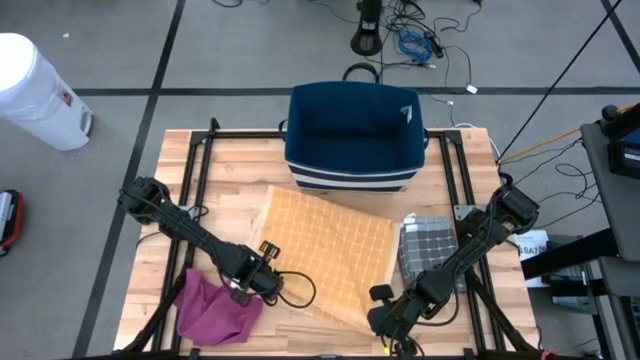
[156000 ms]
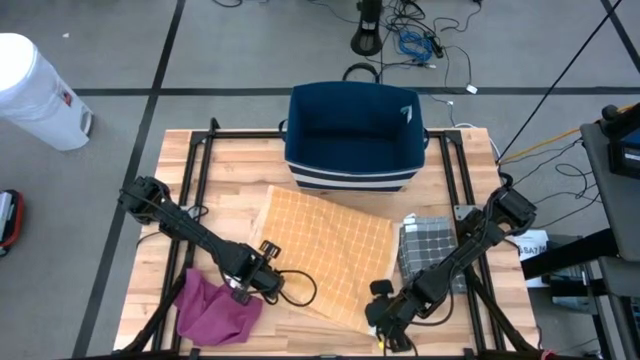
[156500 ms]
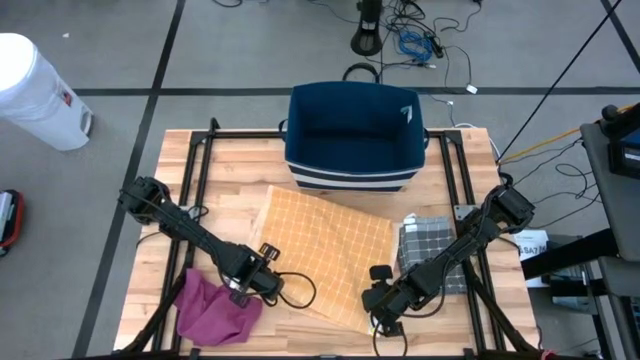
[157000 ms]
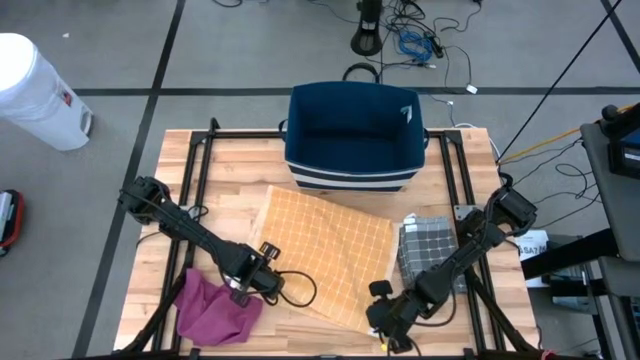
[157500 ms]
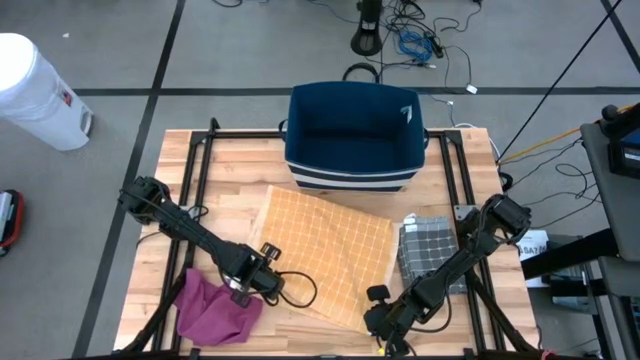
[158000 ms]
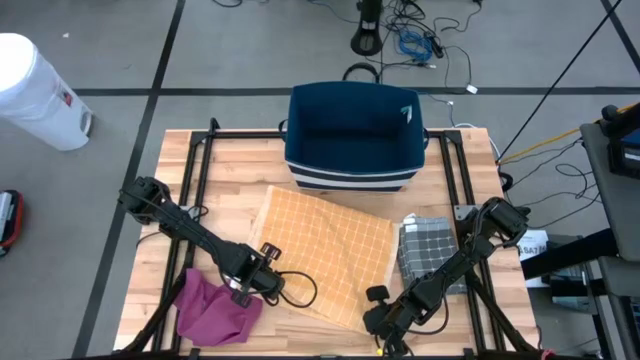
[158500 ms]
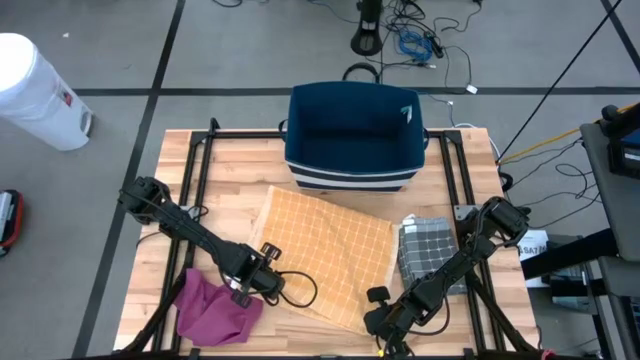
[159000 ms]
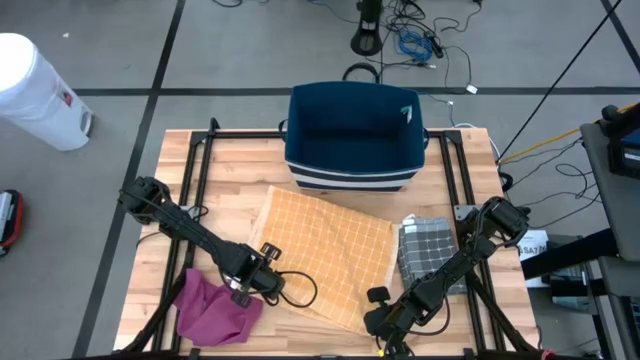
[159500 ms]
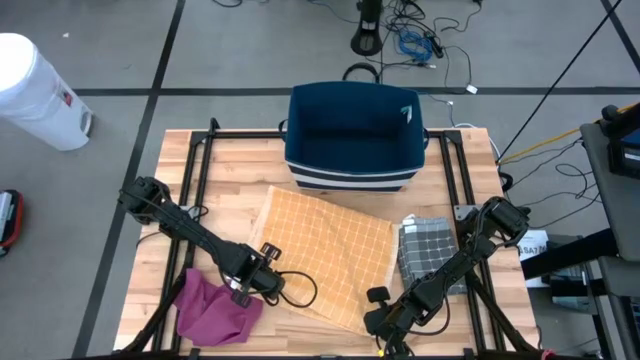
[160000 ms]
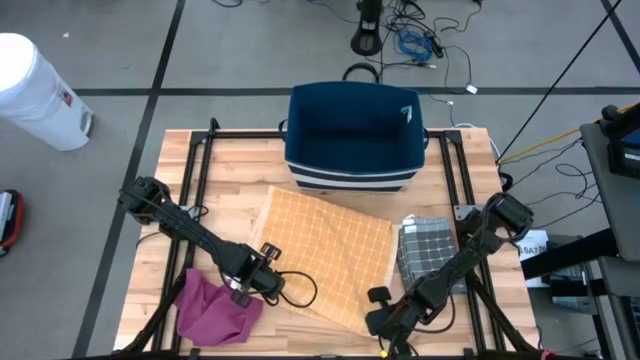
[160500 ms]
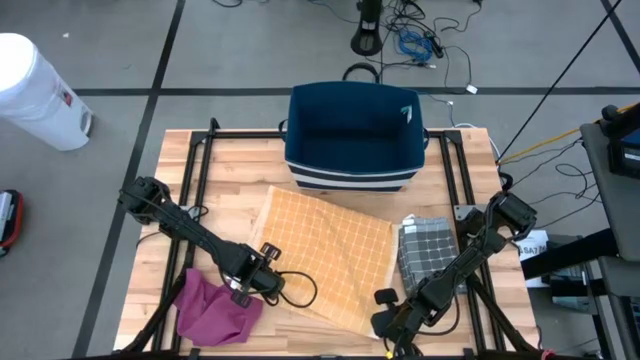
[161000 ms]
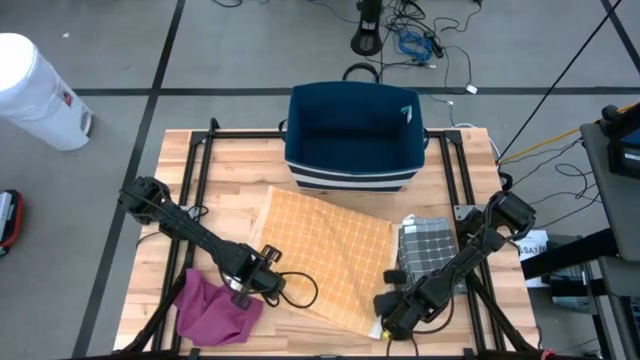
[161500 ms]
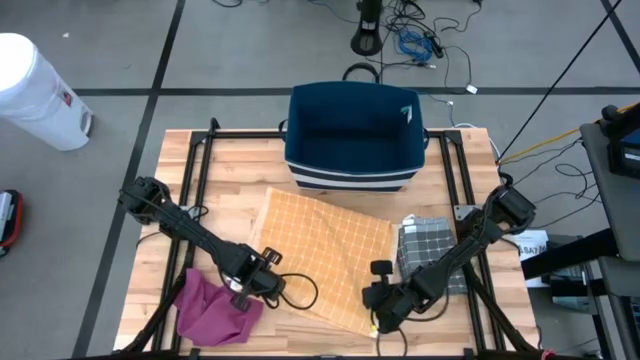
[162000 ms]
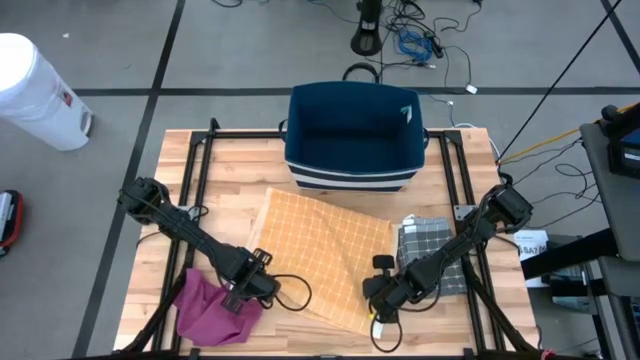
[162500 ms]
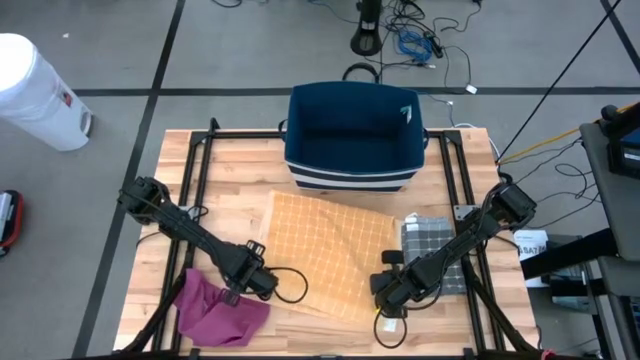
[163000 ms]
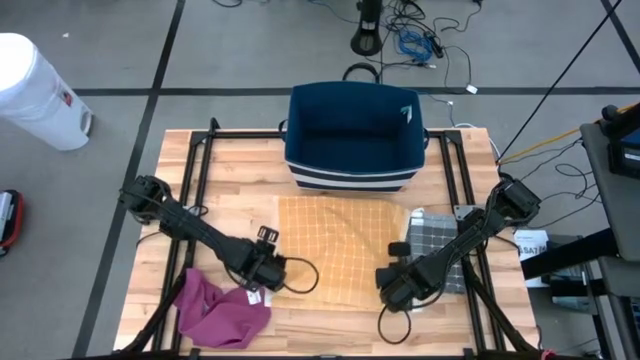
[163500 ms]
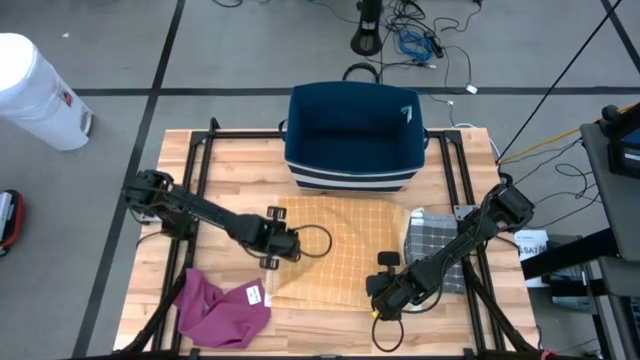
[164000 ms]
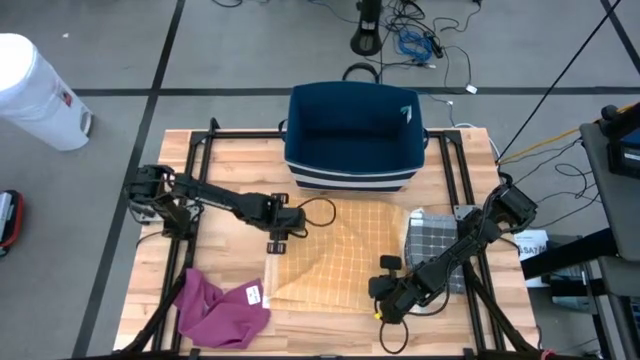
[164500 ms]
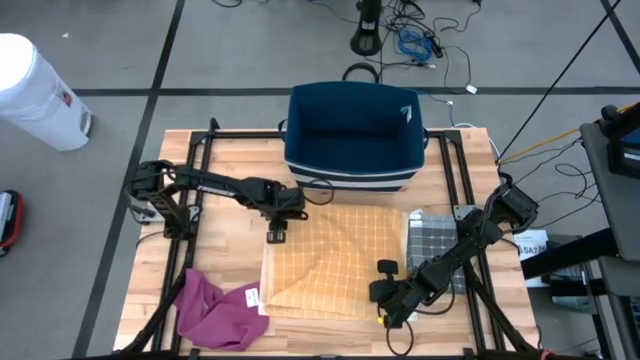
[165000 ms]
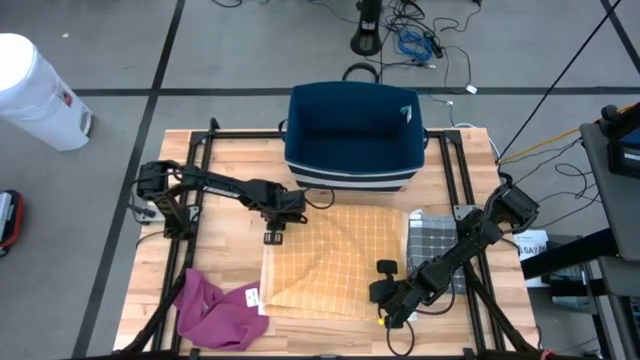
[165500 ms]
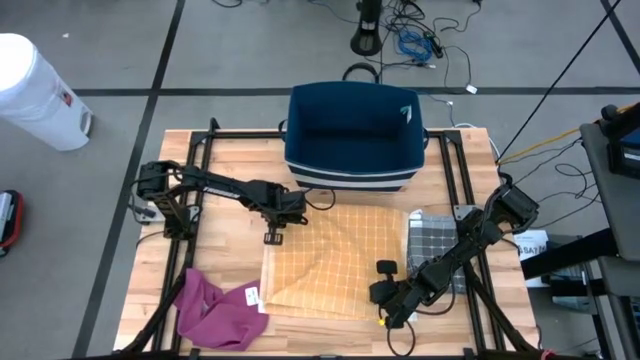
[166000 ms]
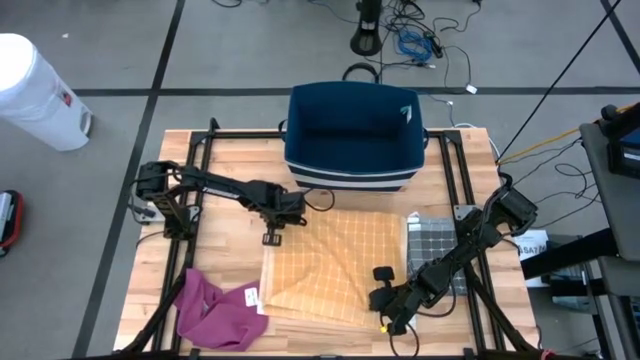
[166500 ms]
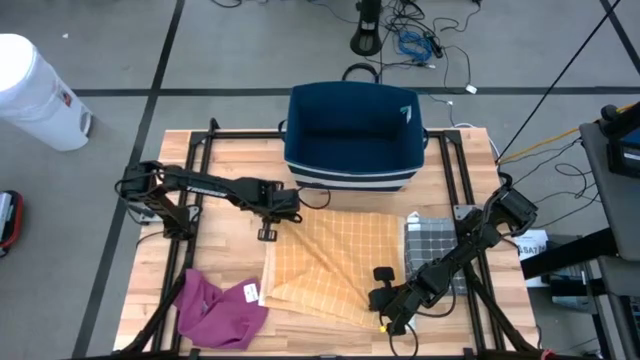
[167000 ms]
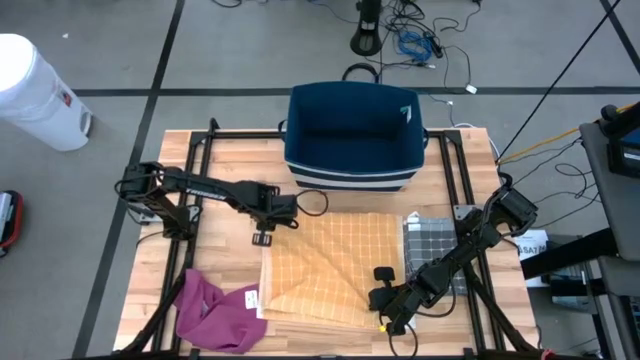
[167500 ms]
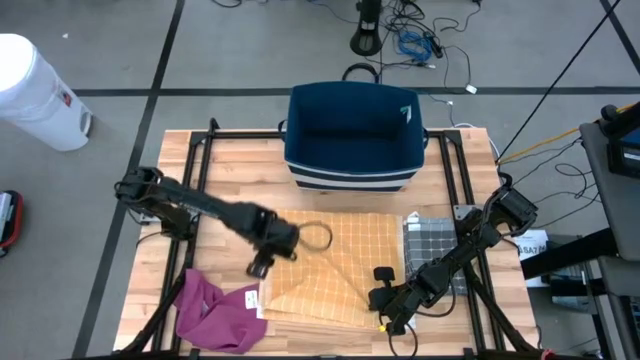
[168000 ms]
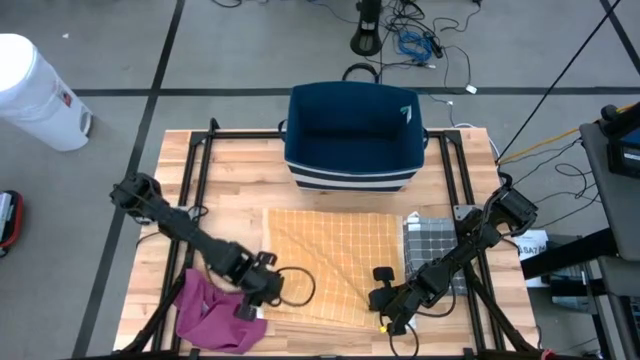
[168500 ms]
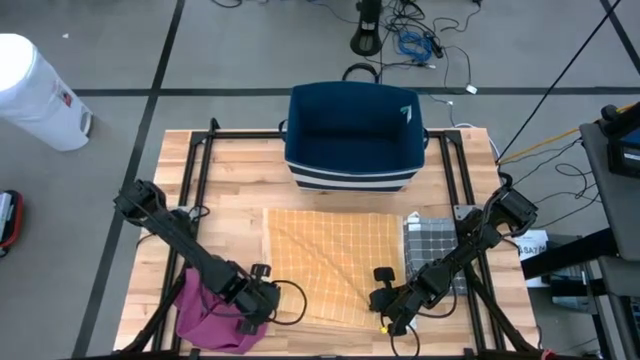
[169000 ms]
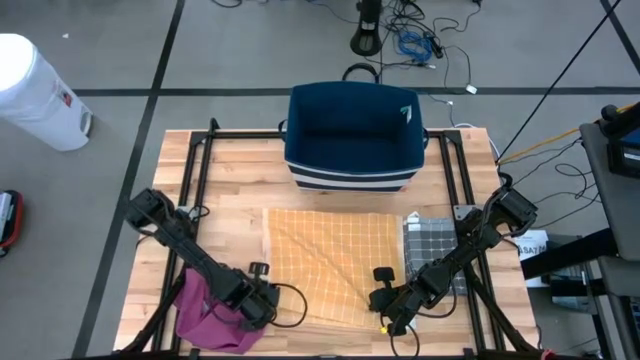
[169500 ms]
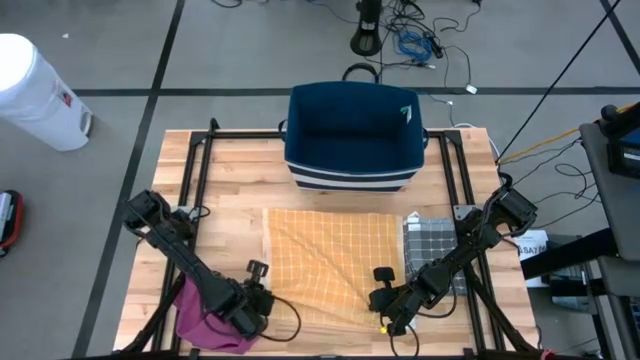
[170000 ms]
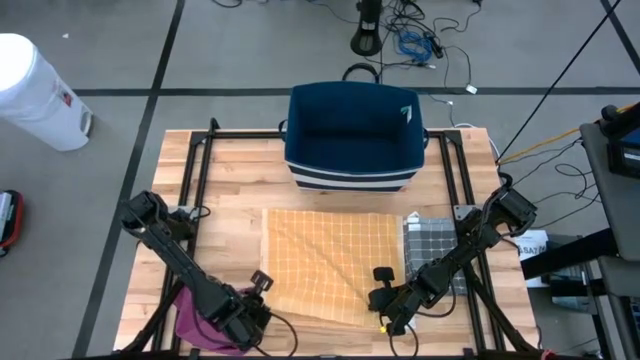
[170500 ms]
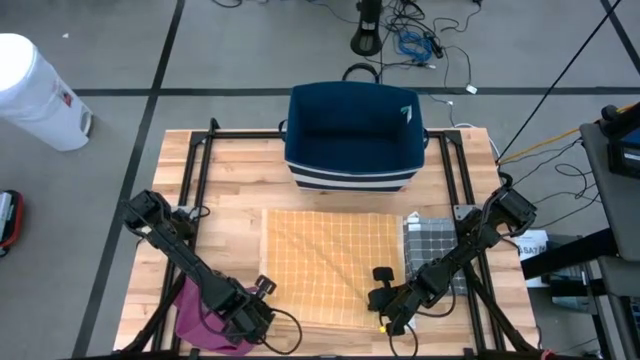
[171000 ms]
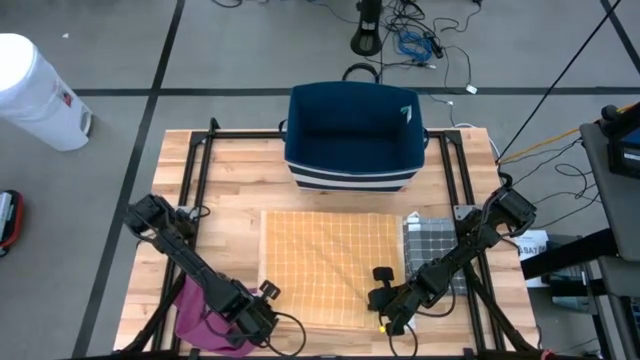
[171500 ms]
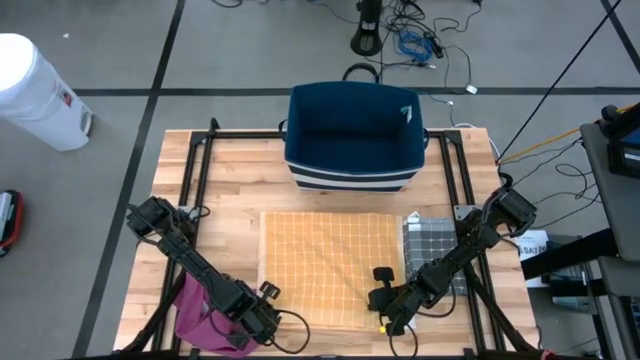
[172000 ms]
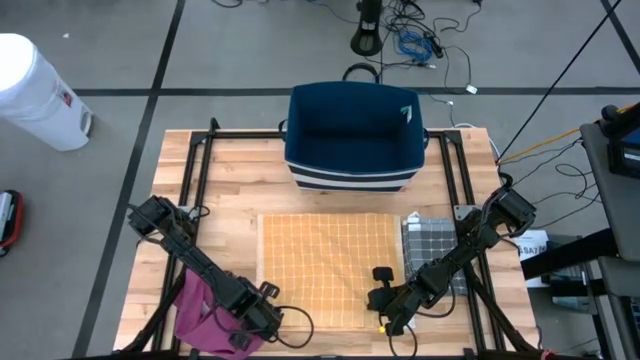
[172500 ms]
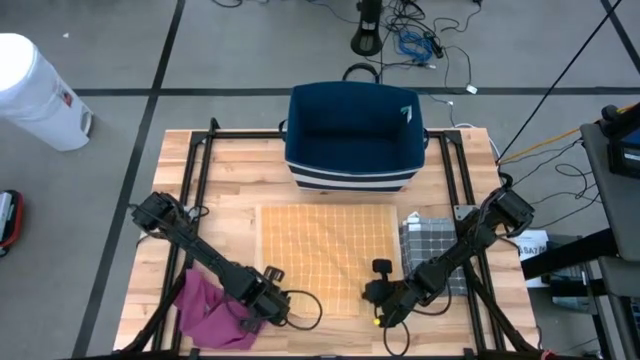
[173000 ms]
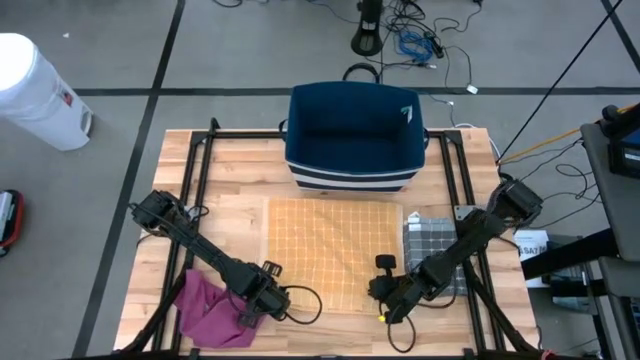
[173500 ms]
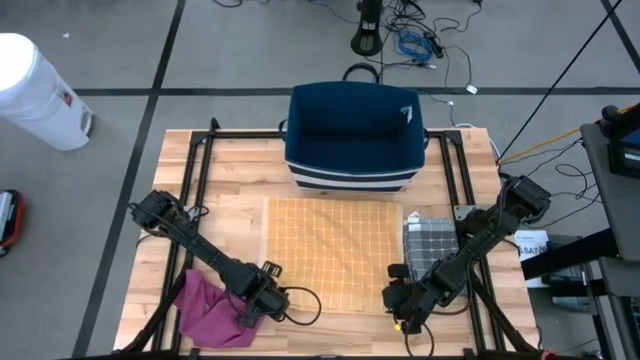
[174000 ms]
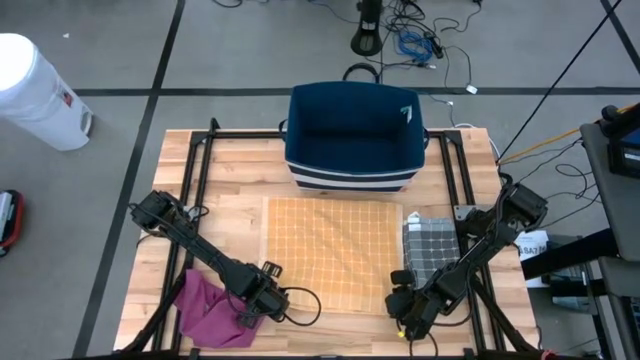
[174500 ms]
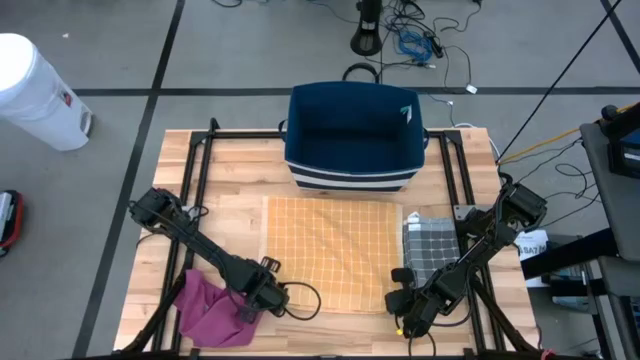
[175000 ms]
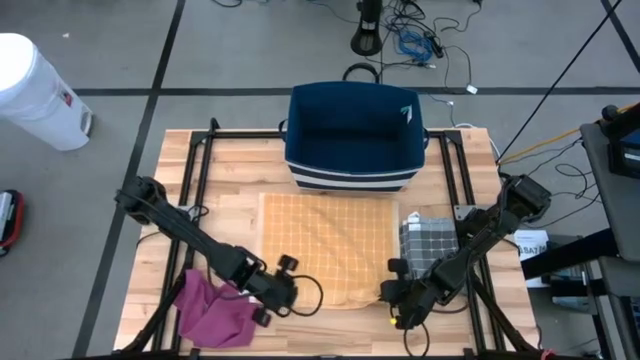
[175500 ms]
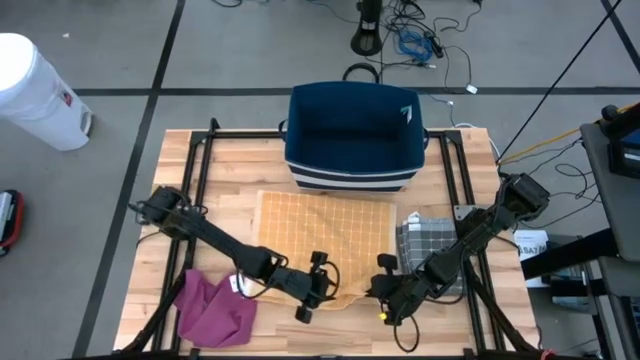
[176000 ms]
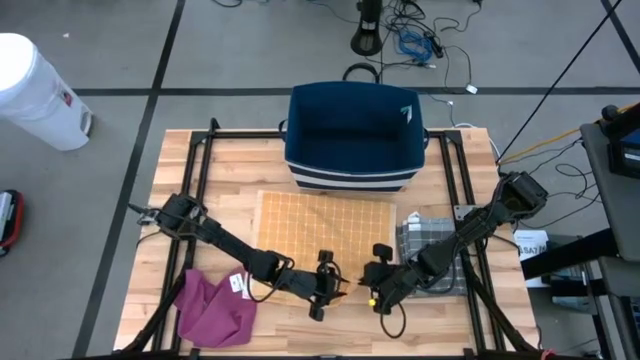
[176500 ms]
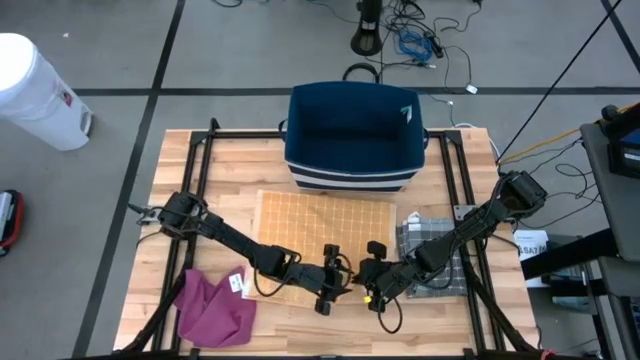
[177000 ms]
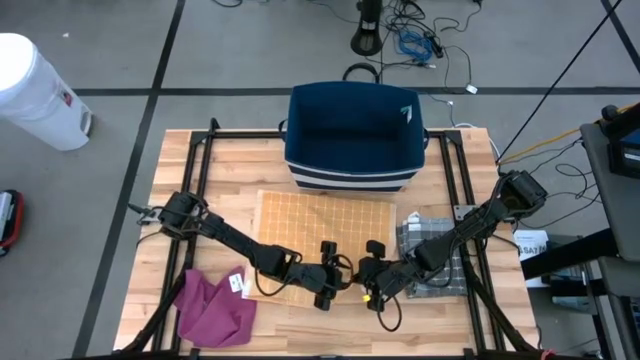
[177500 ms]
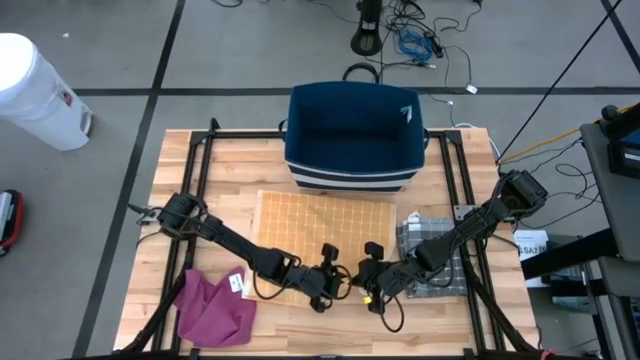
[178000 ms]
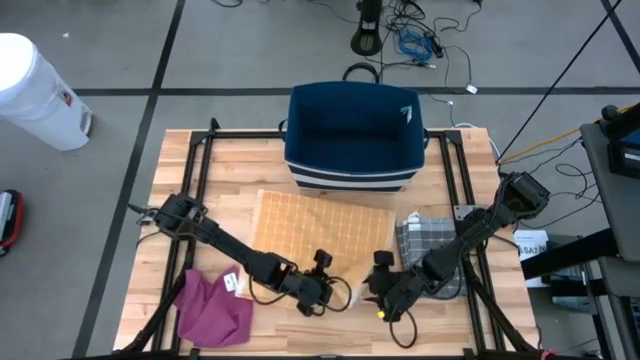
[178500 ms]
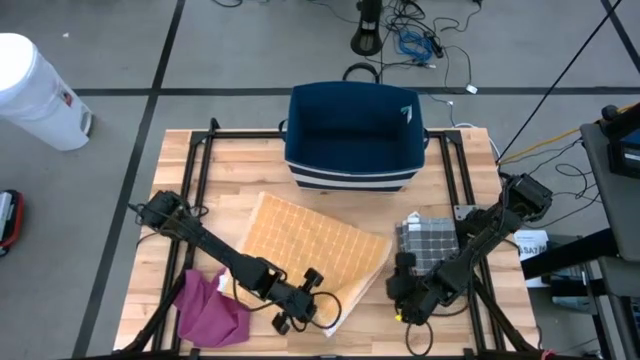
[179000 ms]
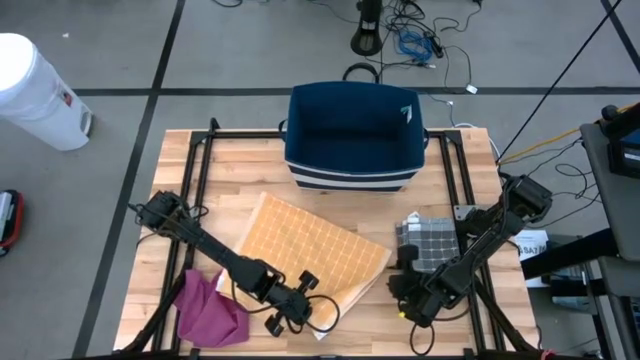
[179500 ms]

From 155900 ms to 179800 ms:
Task: Fold towel
Fold the orange patterned towel
